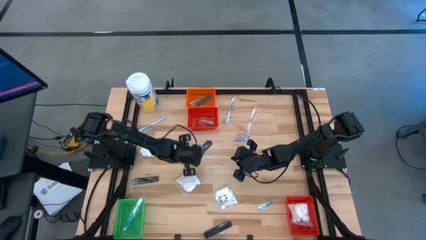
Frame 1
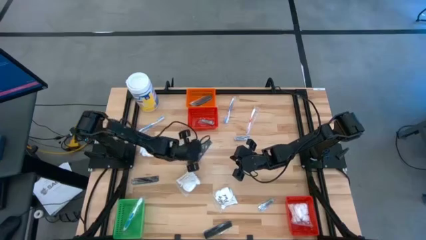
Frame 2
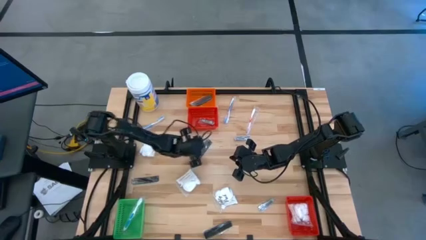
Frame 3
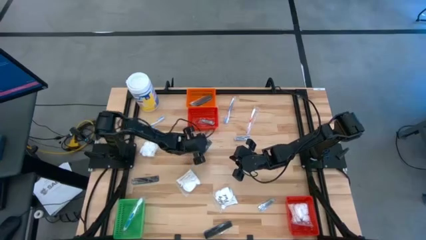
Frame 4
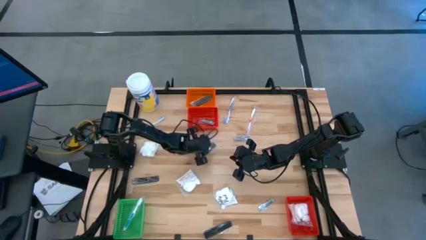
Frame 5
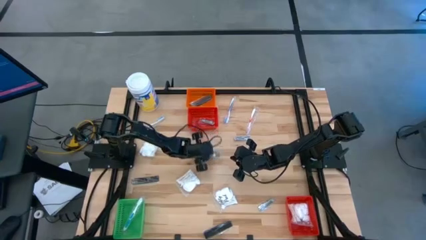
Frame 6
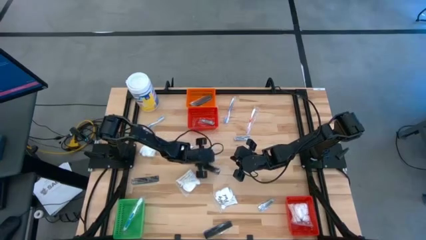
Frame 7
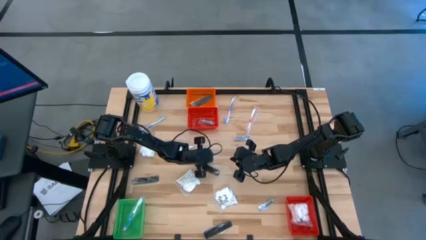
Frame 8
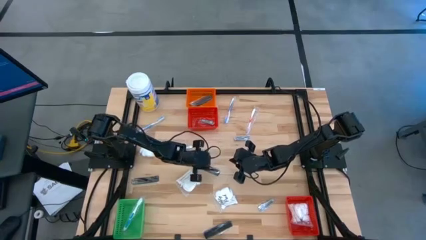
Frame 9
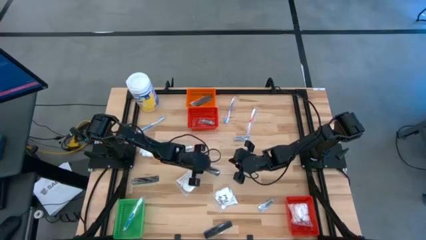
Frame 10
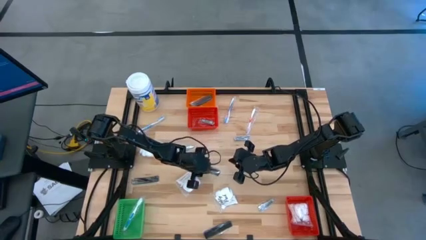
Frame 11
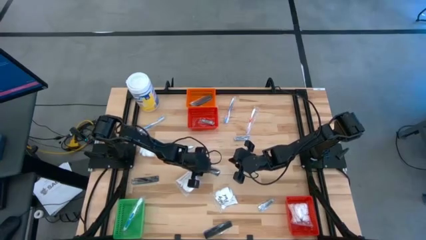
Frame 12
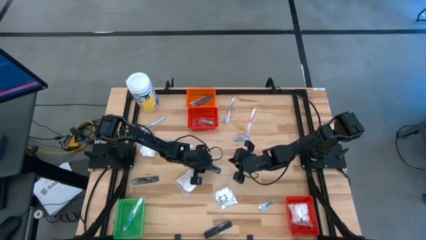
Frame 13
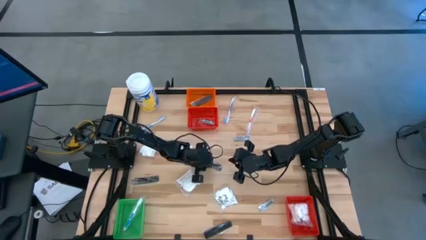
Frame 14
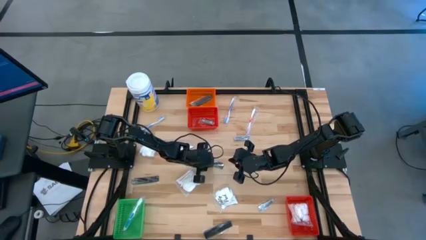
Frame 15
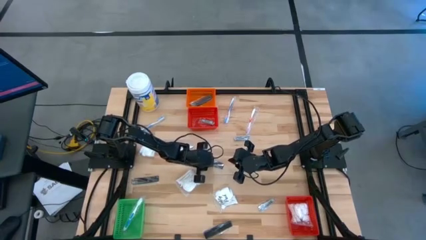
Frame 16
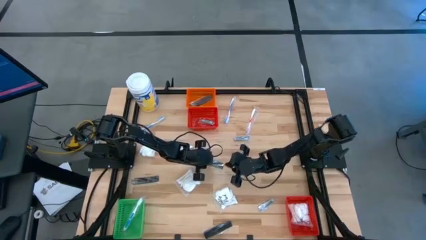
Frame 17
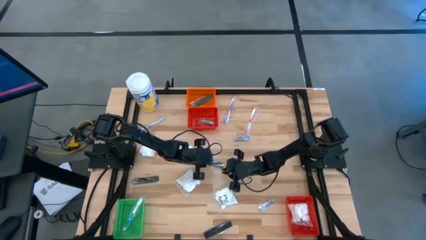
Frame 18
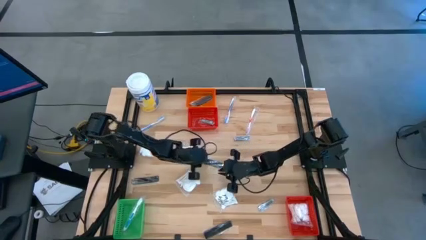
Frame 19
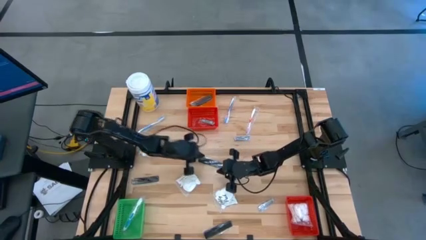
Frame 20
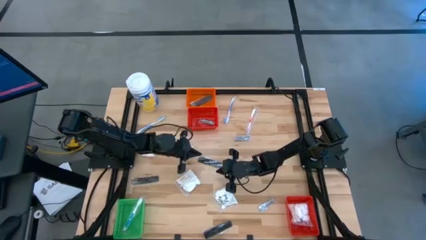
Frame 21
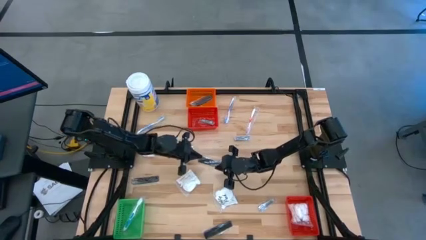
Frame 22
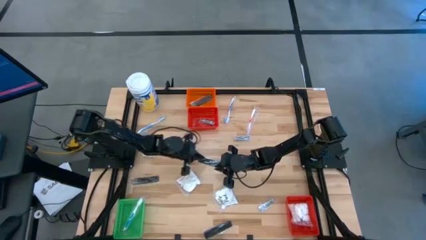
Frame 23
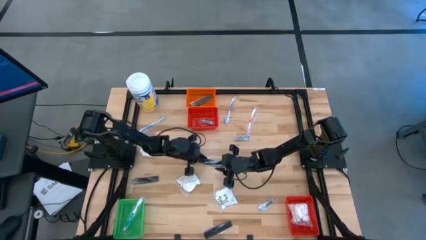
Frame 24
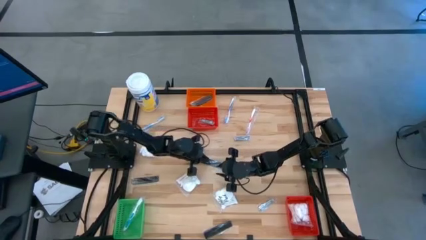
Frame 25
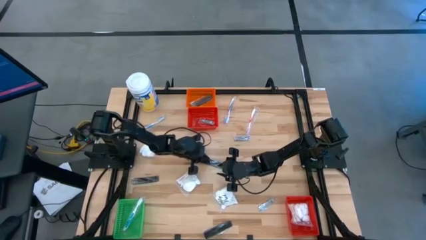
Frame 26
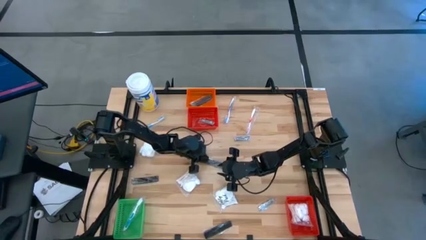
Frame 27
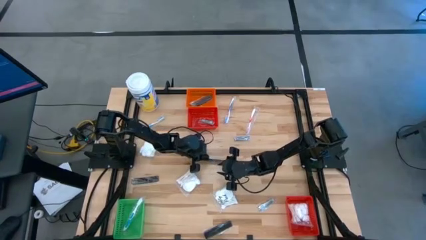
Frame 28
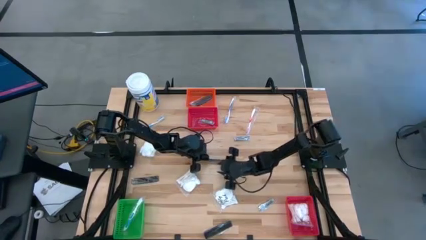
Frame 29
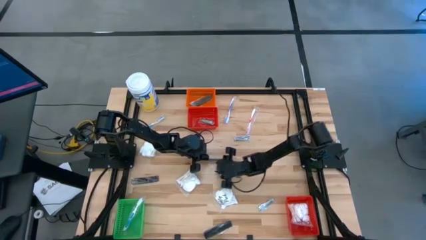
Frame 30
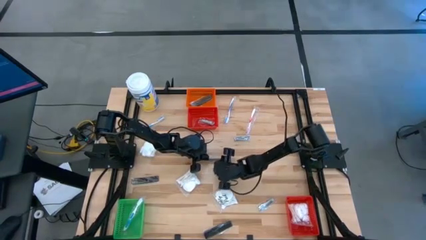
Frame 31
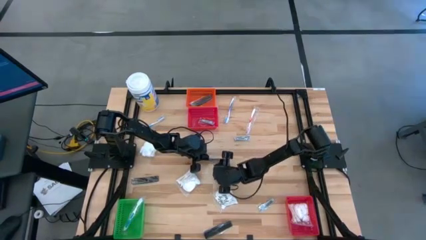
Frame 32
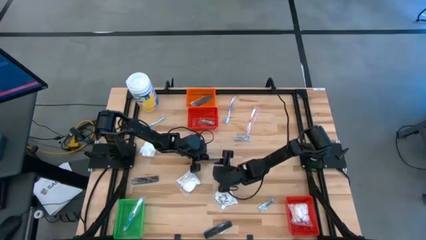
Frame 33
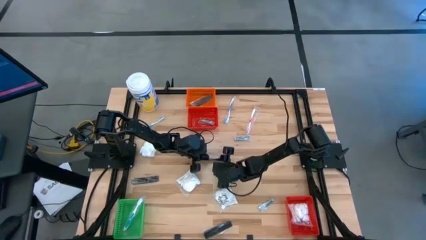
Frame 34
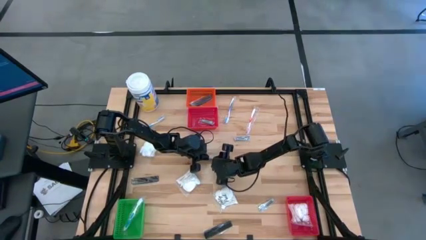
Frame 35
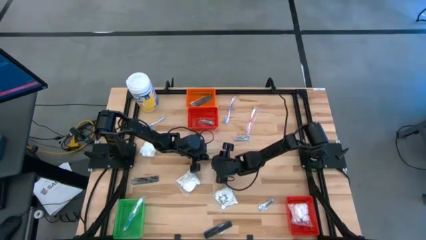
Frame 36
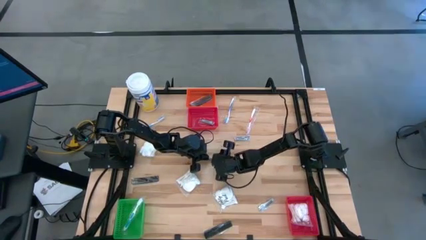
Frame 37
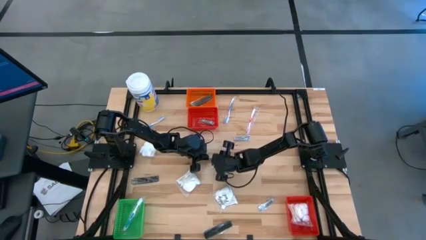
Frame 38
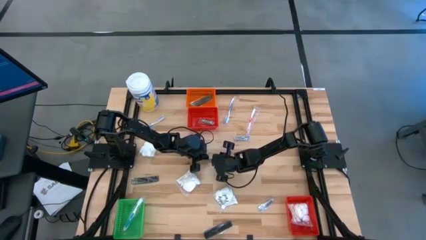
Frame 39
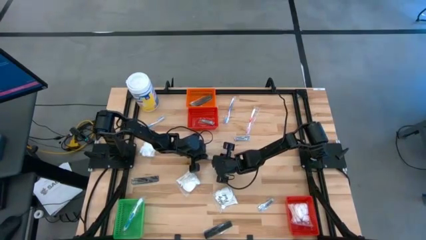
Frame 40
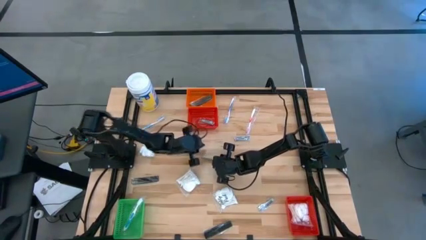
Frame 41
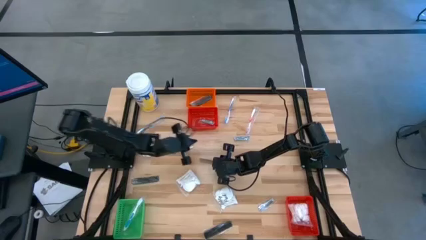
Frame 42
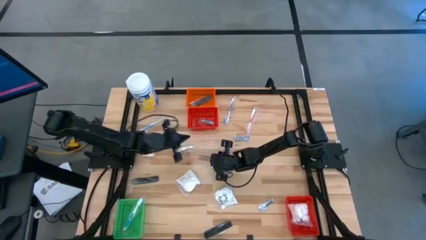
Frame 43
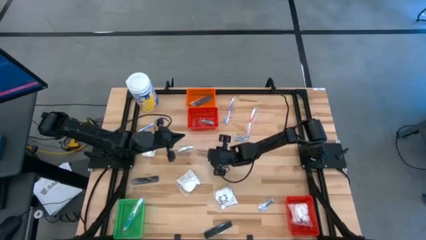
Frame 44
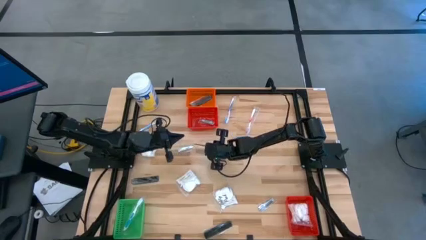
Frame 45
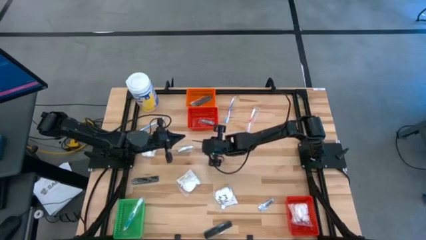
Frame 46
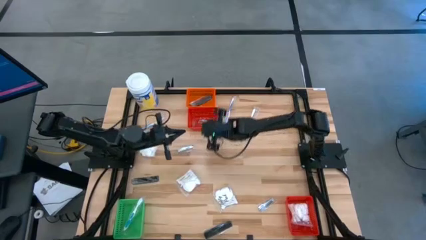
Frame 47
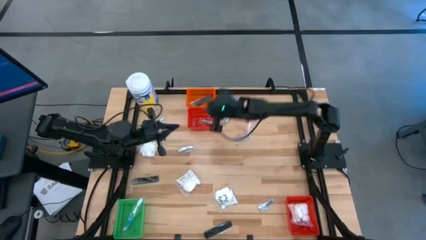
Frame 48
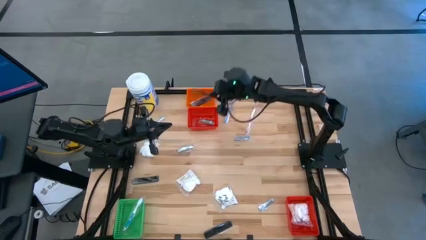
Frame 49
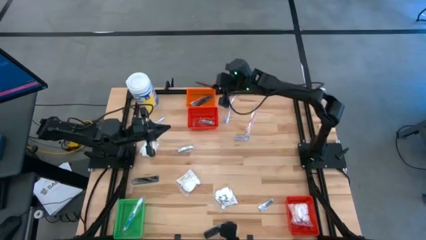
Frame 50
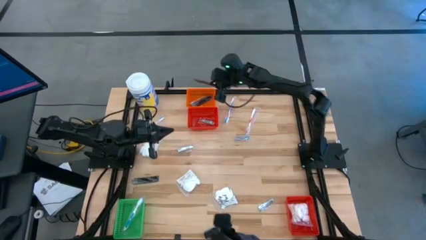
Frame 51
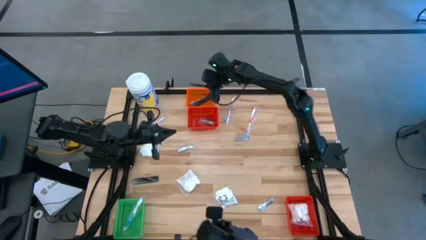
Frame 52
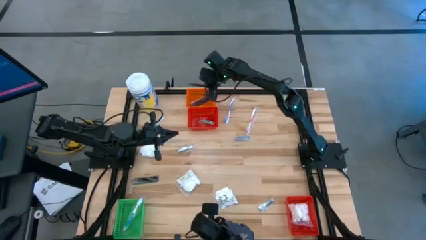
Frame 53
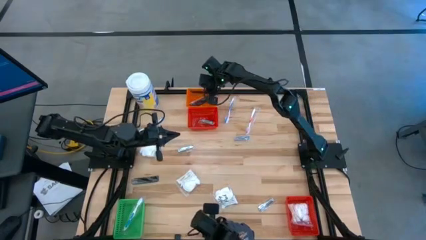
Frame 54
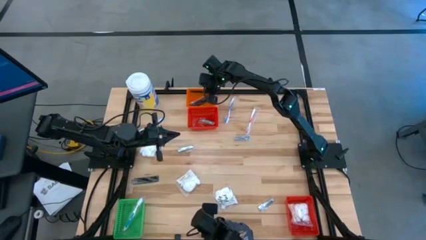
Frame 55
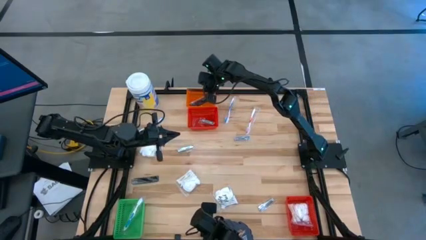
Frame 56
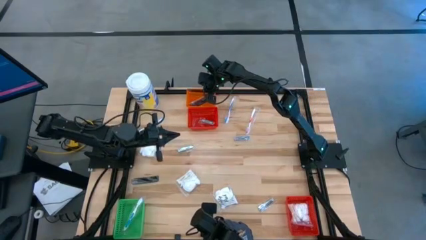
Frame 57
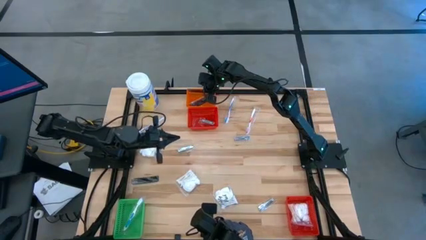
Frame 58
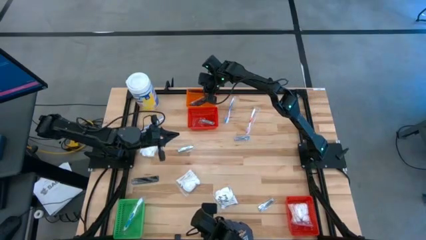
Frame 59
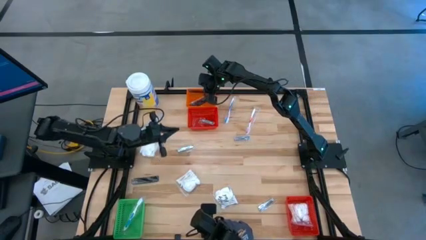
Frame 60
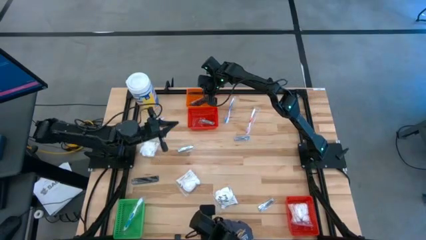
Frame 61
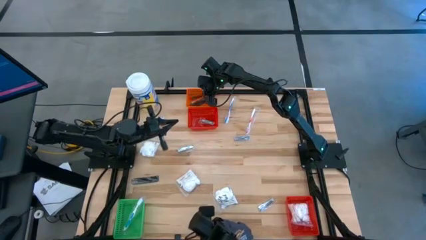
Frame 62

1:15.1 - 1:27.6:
Task: Pick & Place Travel size toiletries
Put the comb into the orange basket

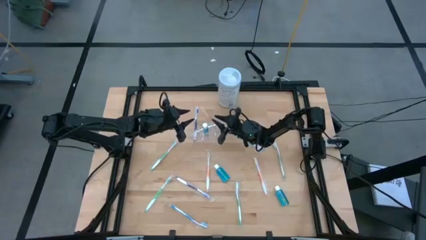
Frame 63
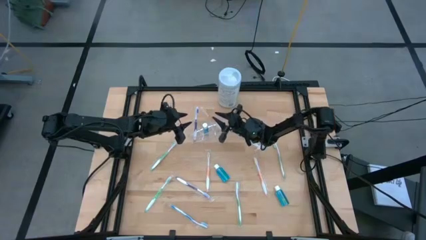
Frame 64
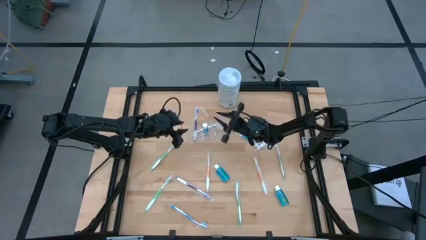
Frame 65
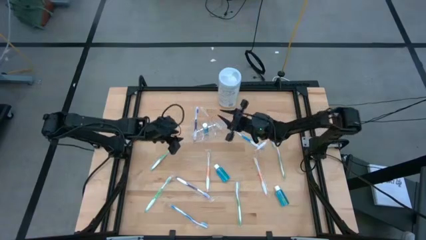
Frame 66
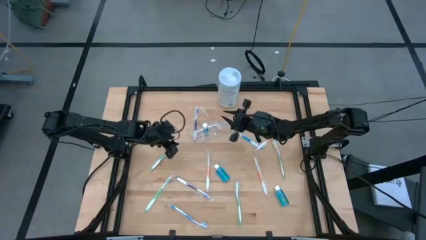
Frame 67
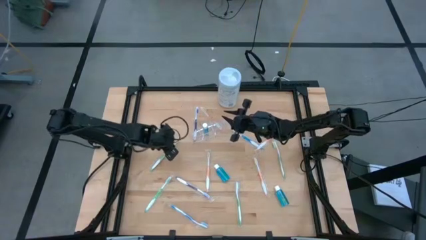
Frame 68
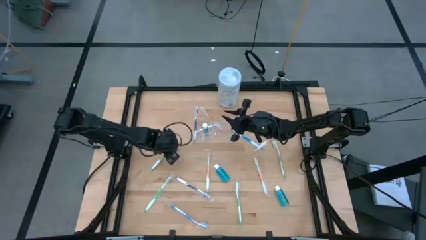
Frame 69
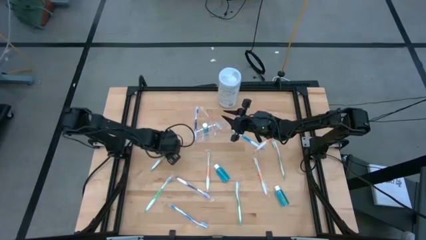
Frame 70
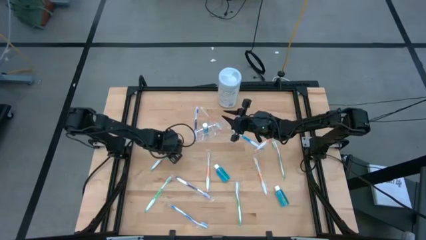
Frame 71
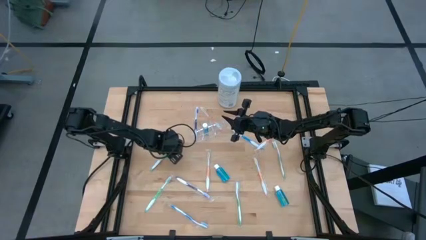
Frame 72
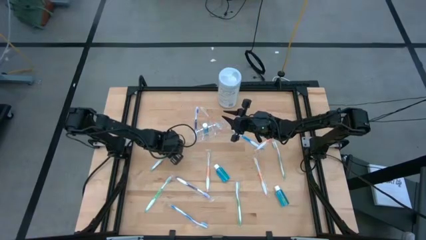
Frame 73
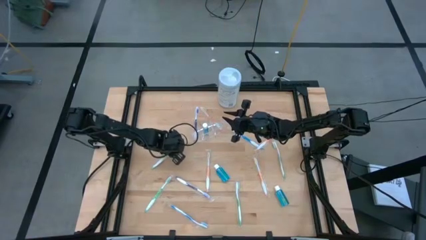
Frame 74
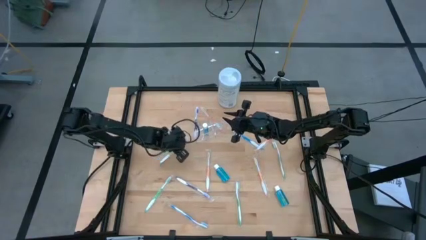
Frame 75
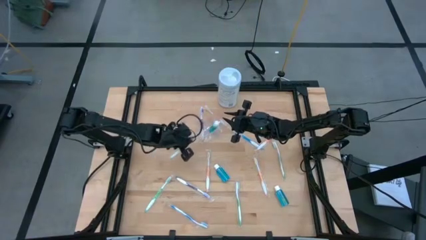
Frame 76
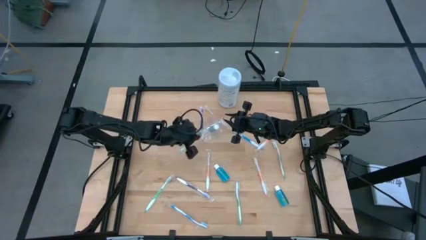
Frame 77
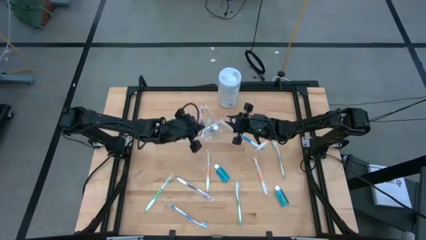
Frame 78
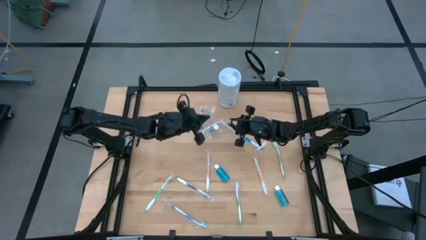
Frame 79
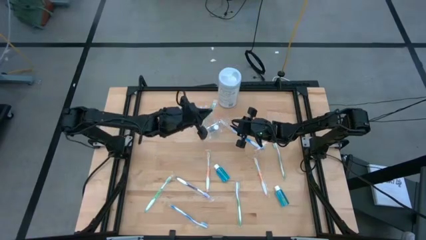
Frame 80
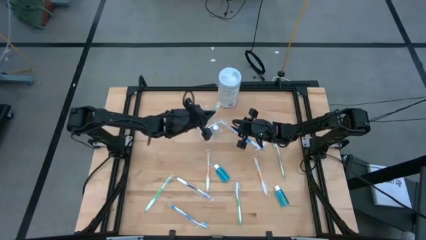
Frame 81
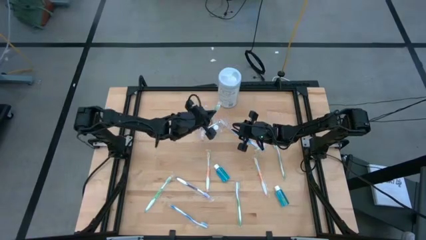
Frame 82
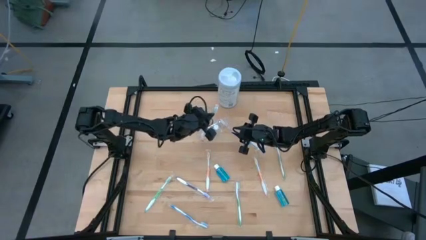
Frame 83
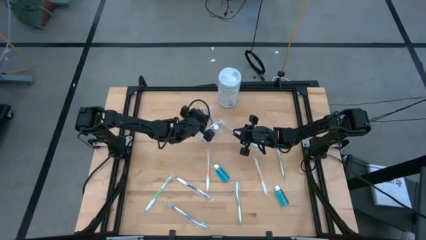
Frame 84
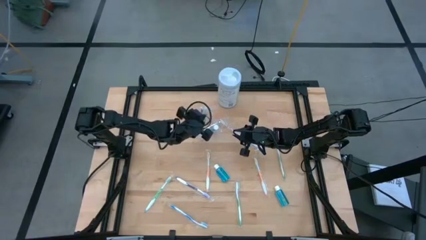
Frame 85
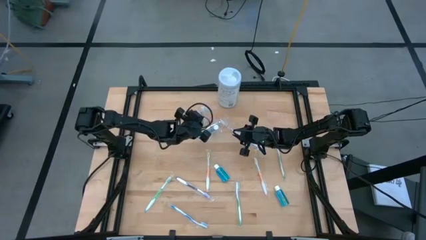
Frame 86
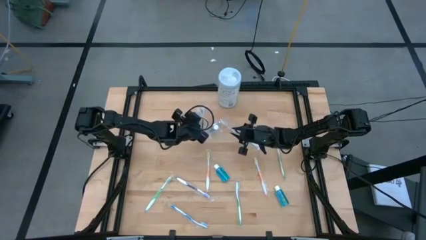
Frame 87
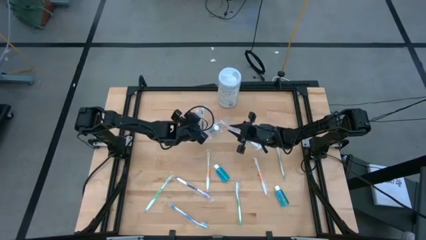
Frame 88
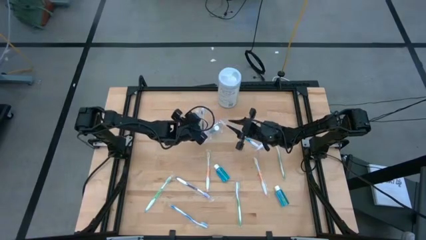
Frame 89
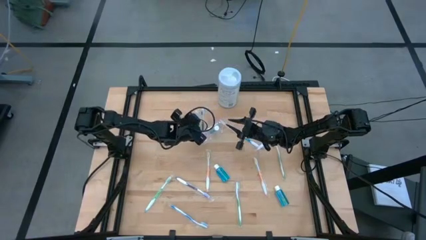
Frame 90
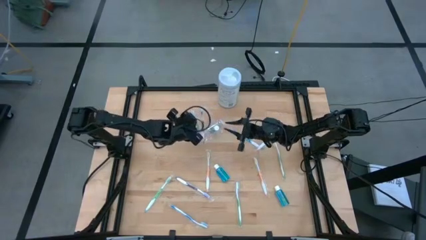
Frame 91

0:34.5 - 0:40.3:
Task: Pick & Place toothbrushing station
Put the green toothbrush into the transparent organizer
